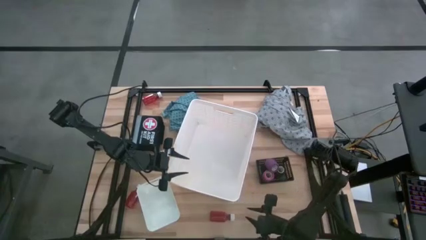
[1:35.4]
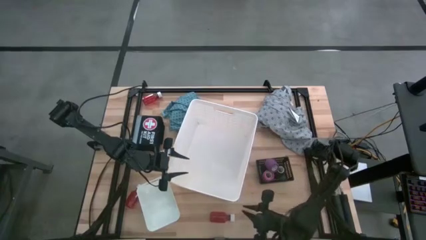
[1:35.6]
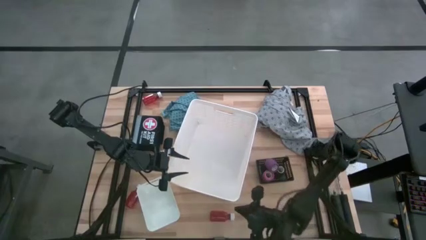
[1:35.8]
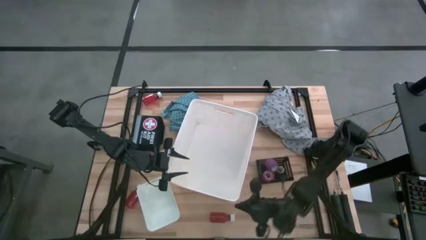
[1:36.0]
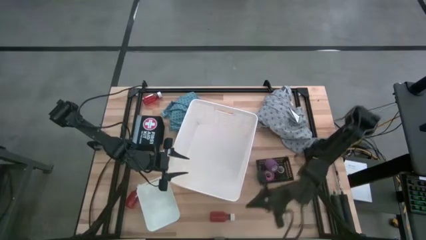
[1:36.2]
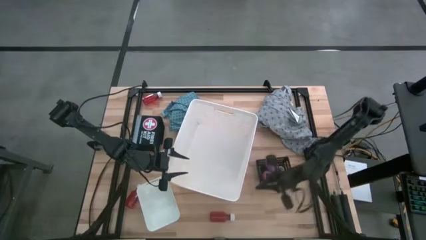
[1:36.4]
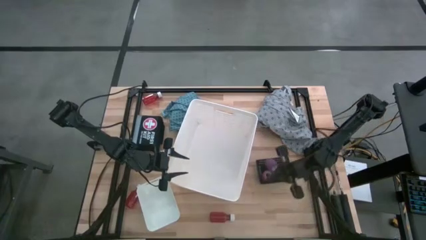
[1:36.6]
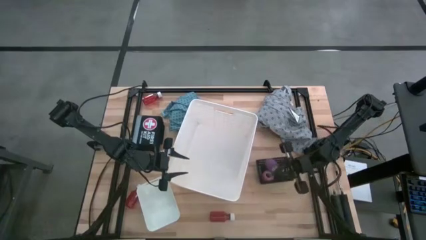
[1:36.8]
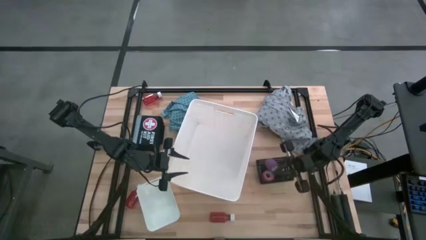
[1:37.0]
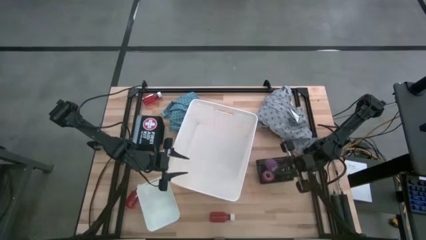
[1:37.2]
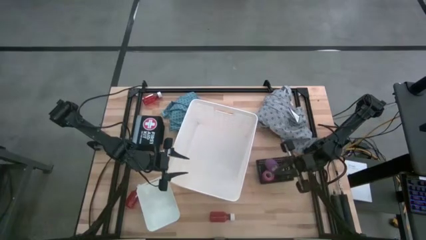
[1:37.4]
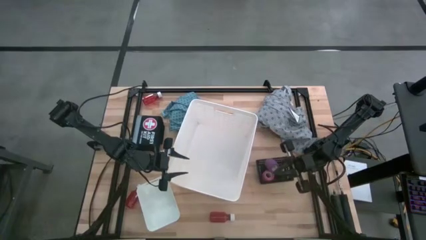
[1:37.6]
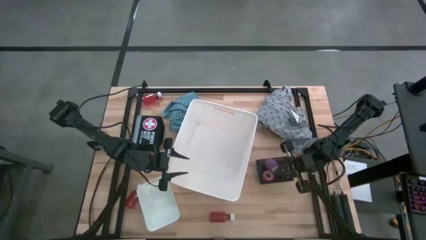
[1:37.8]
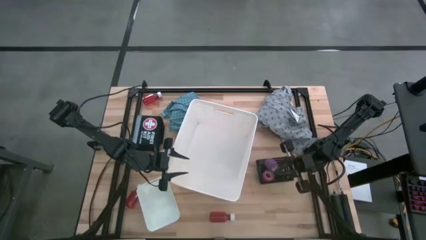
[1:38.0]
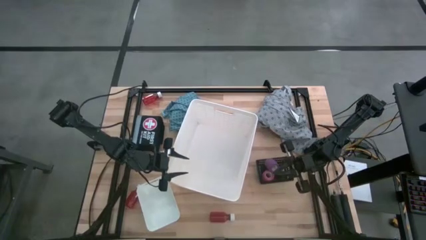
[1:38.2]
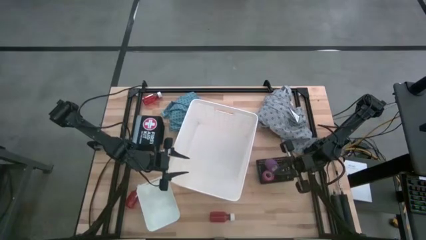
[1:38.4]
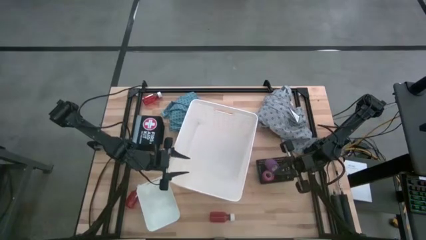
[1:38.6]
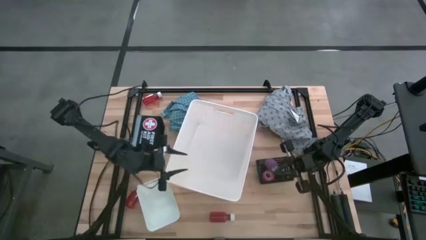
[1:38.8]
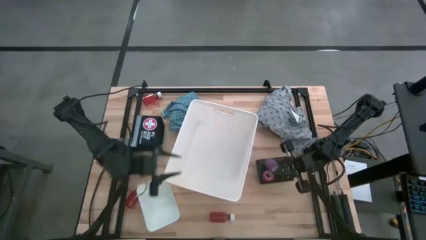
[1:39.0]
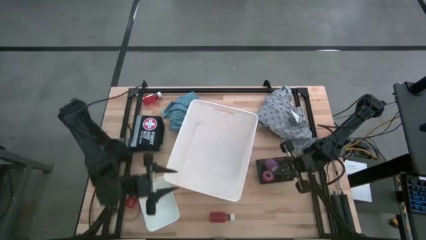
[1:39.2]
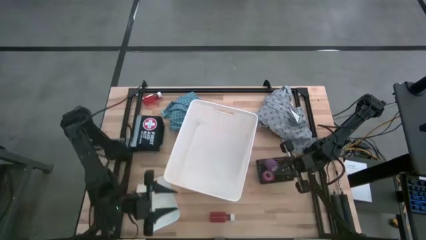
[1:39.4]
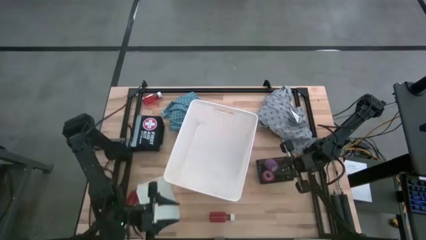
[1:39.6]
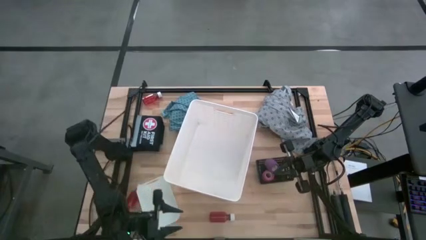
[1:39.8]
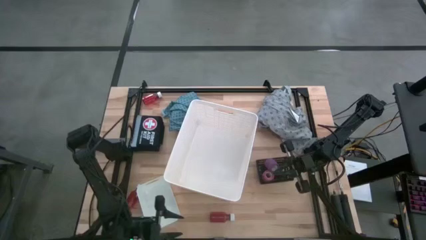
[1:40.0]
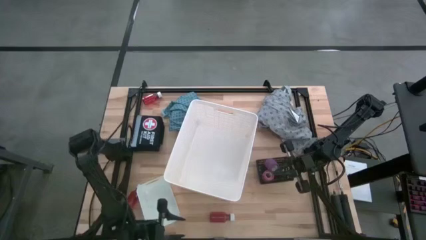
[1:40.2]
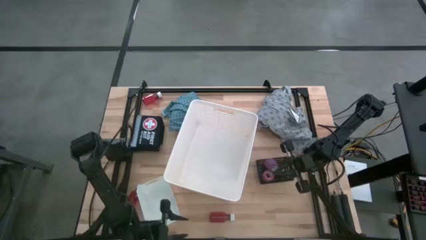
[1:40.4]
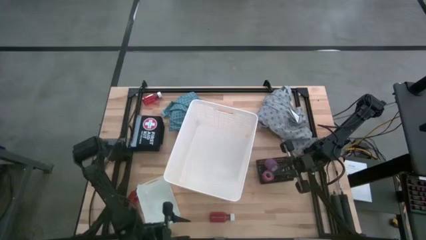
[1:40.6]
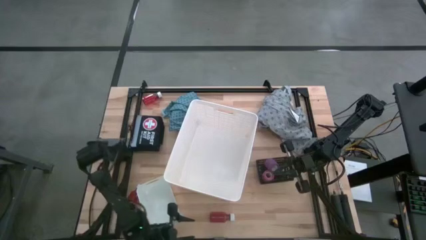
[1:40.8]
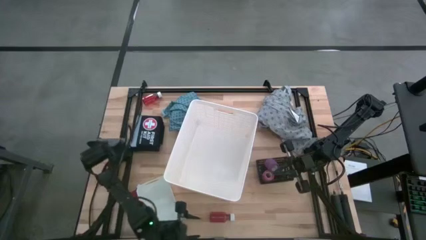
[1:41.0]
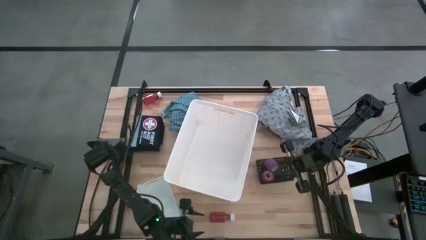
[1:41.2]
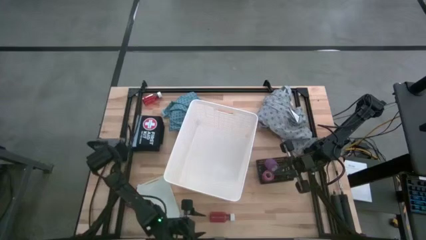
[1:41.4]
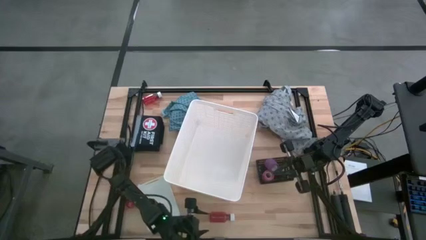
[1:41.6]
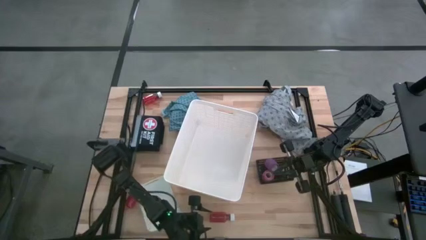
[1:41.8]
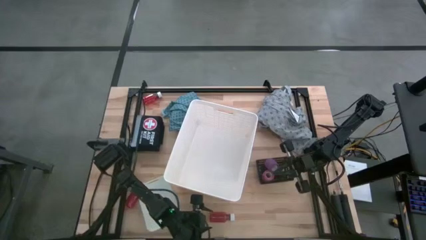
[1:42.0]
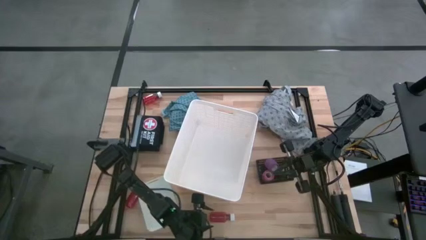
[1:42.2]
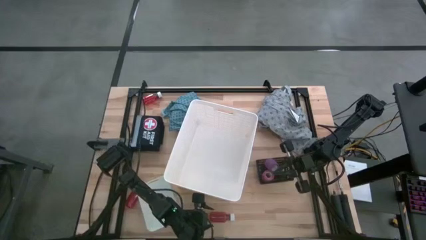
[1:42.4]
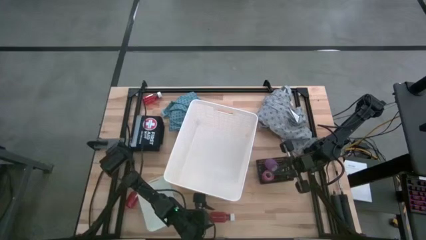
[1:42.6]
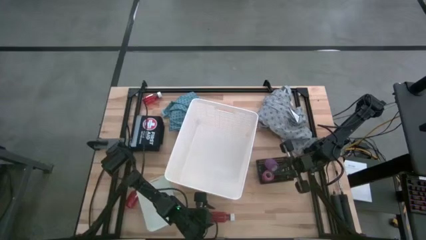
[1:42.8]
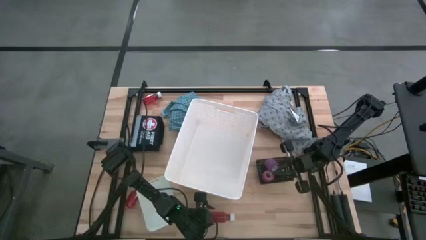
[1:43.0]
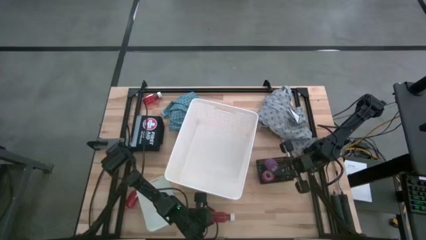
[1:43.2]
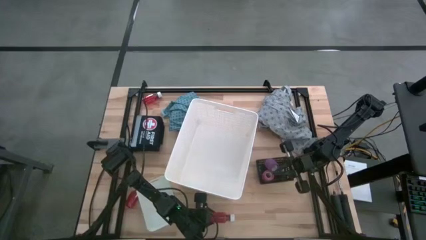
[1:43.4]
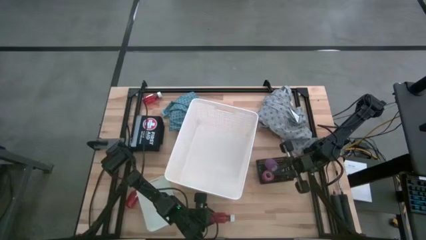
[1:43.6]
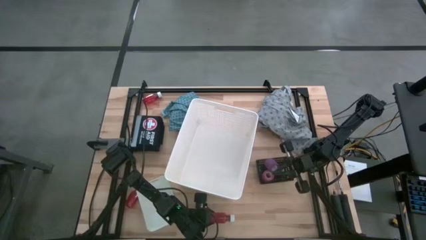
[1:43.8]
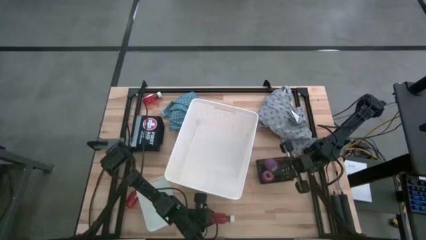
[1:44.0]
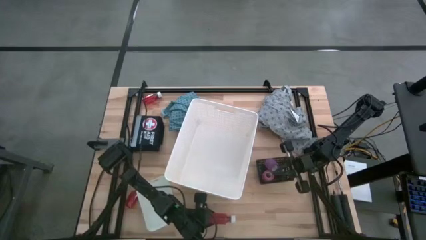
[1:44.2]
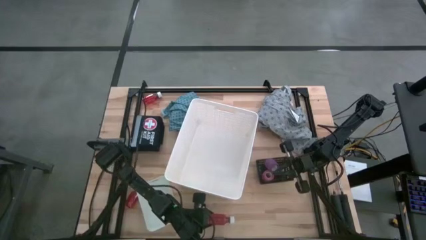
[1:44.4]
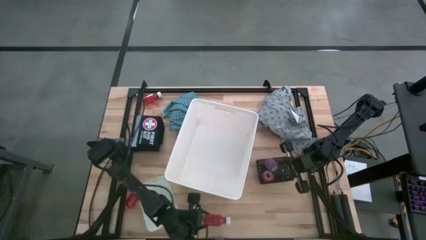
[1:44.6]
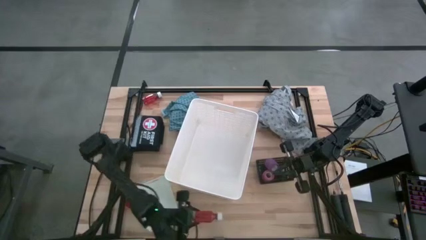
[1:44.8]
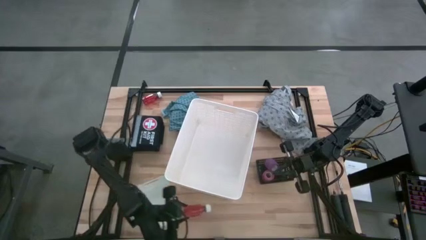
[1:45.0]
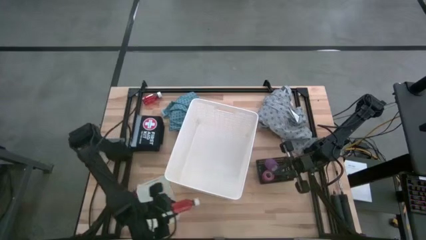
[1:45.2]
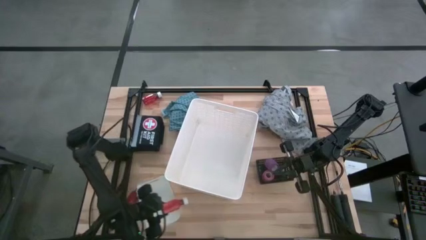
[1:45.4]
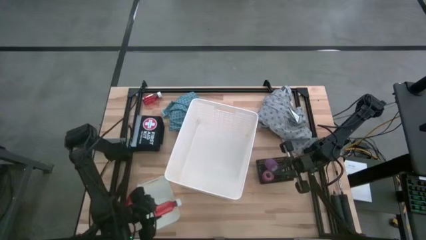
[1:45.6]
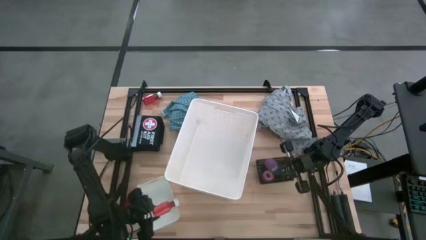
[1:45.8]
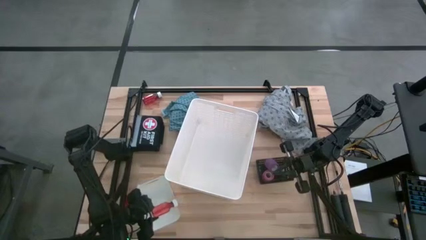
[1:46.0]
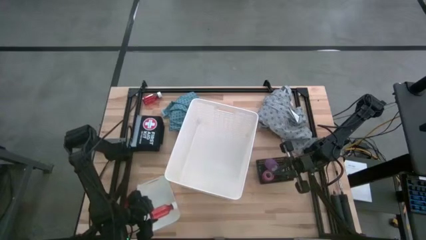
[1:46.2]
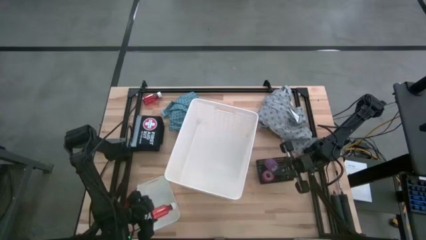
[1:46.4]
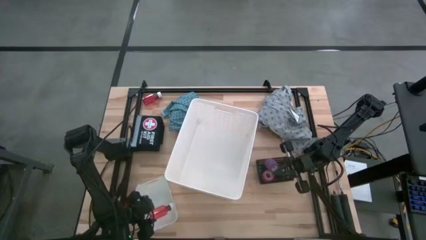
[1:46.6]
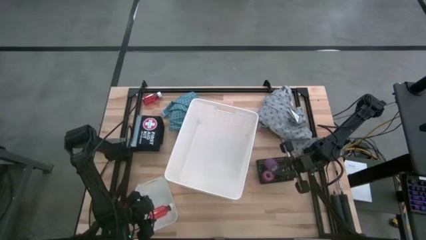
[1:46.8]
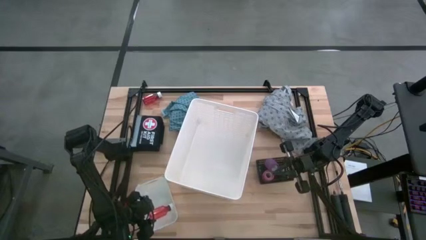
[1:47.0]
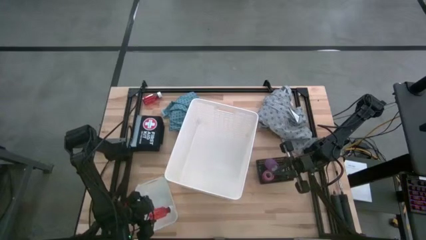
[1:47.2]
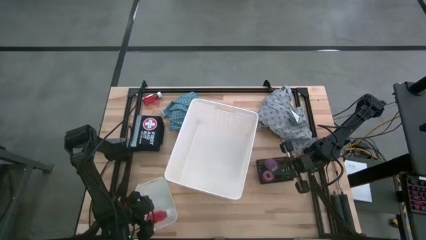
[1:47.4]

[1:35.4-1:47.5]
Task: Pick & place medical supplies in basket/bin
Put the bottom right orange bottle into the white bin

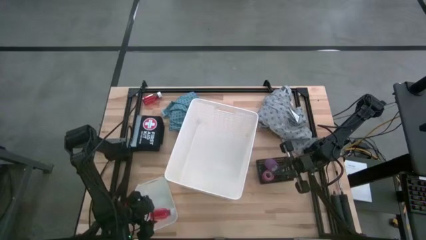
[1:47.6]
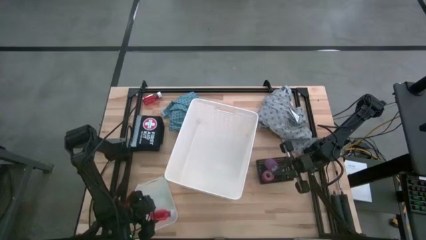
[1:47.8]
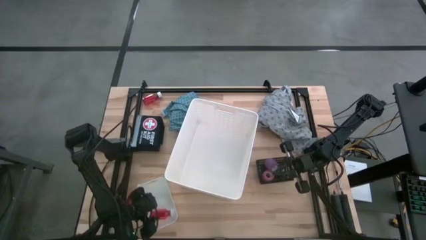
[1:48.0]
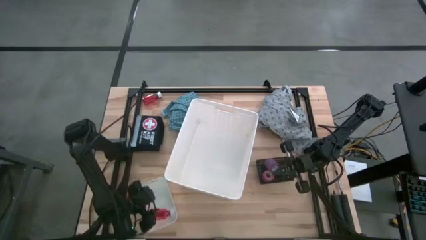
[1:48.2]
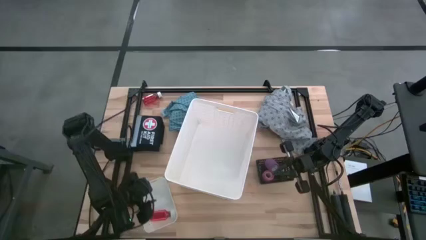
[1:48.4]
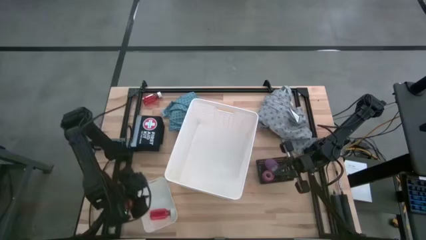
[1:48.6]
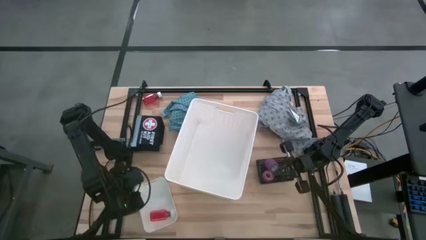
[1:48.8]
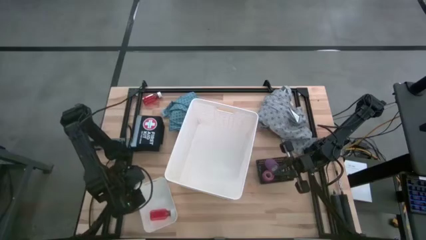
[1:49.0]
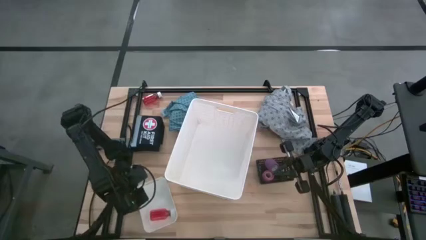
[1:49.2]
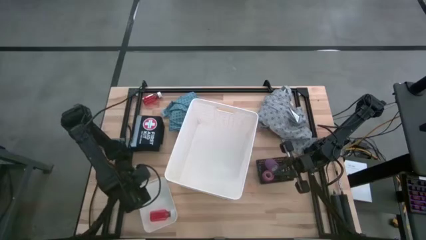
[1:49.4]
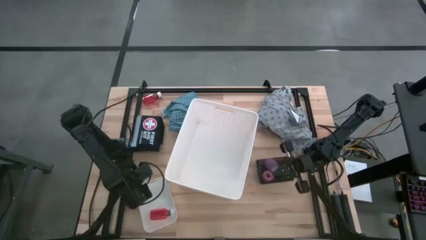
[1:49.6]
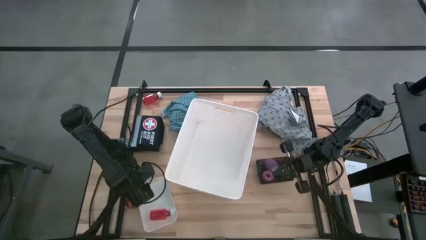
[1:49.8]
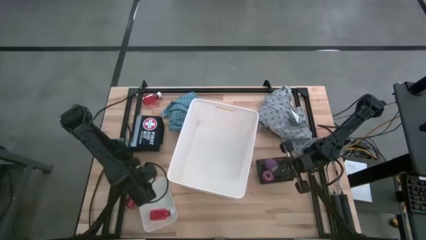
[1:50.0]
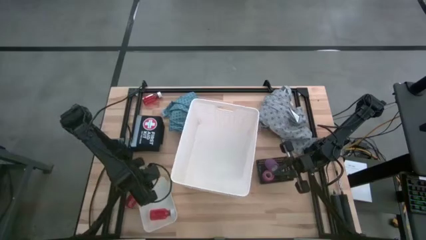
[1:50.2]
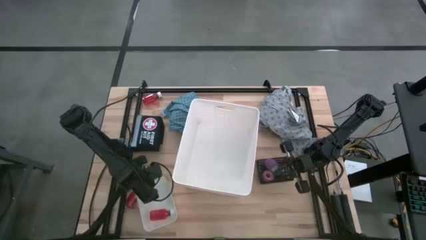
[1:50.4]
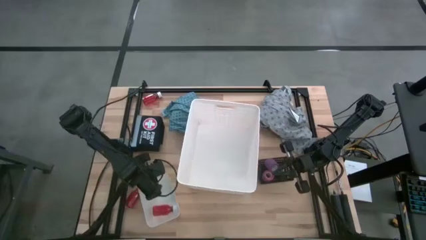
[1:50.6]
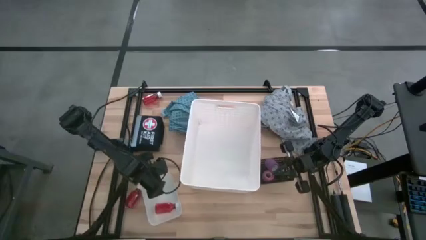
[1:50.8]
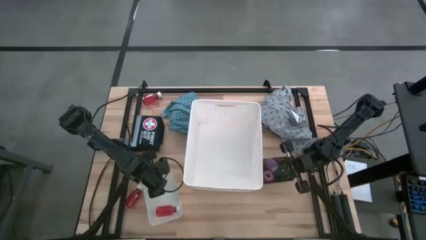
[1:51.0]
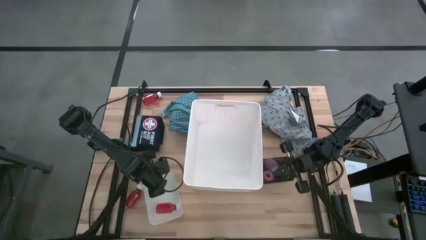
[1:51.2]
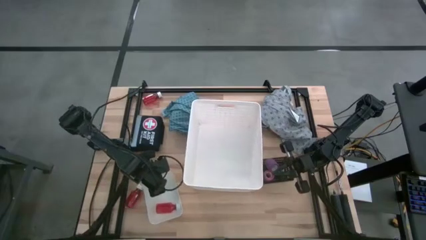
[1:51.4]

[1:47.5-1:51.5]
Adjust the white bin
